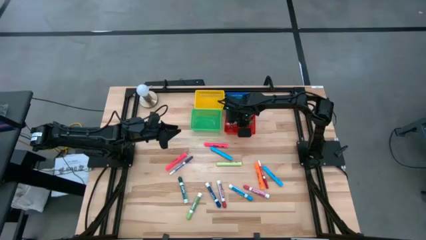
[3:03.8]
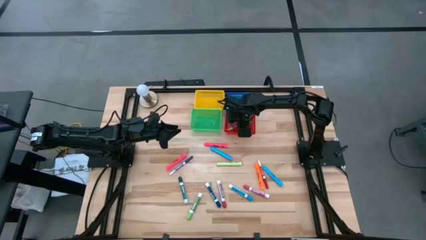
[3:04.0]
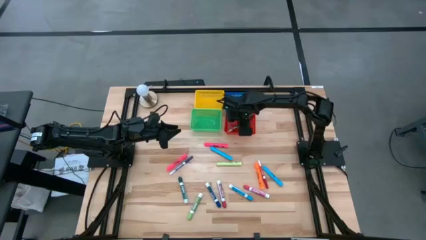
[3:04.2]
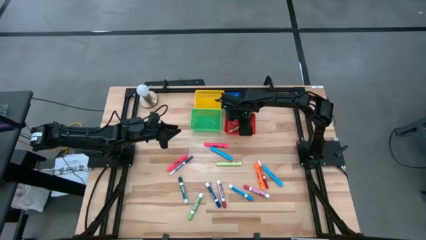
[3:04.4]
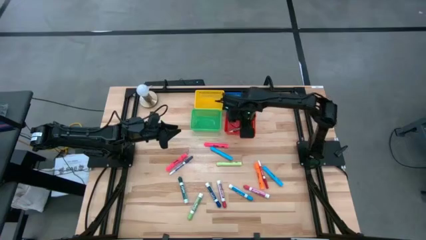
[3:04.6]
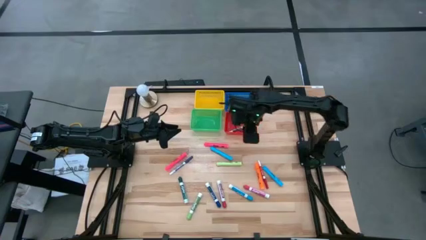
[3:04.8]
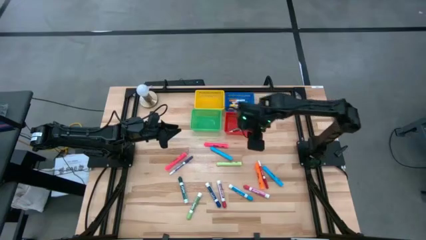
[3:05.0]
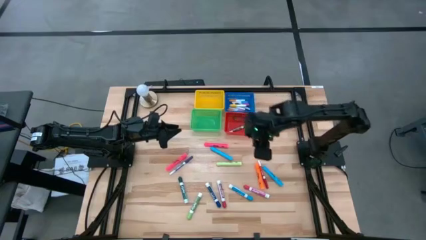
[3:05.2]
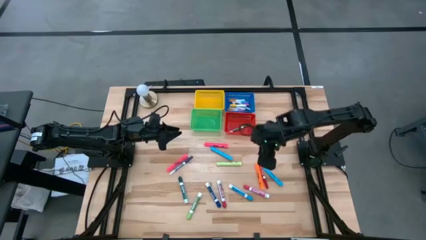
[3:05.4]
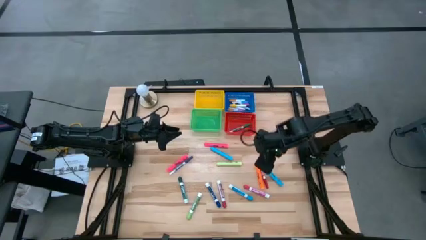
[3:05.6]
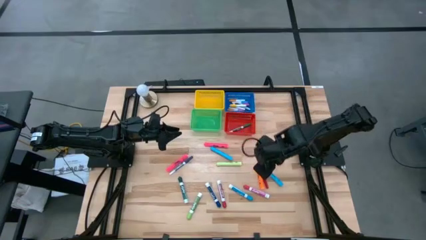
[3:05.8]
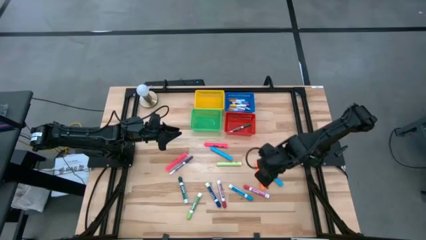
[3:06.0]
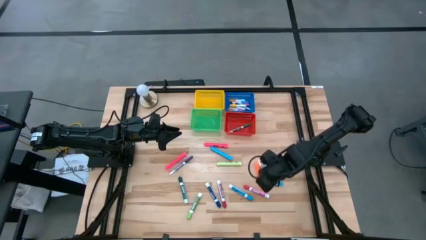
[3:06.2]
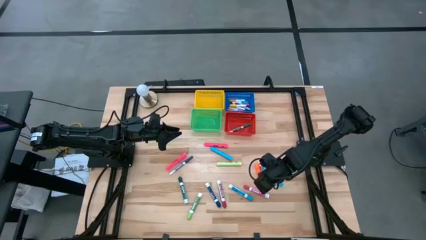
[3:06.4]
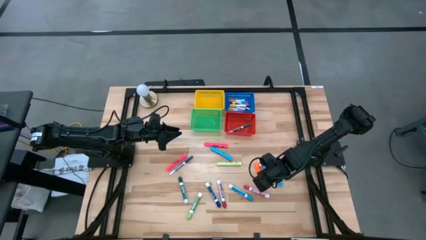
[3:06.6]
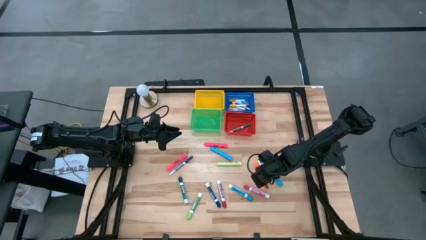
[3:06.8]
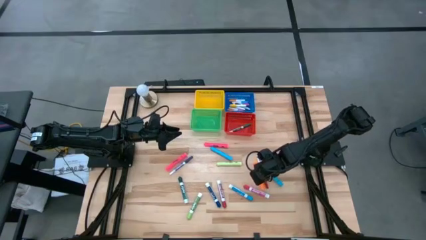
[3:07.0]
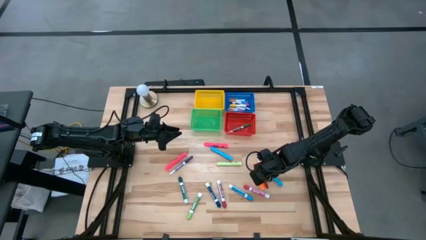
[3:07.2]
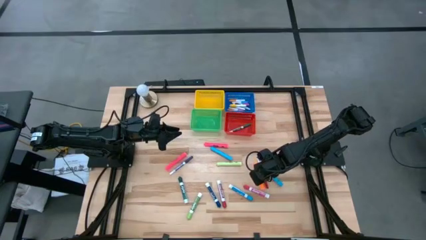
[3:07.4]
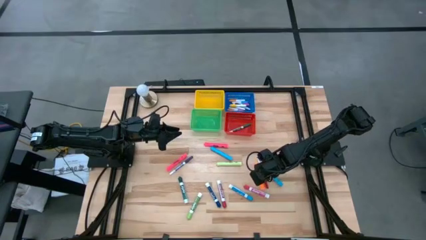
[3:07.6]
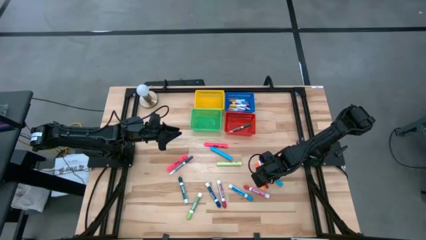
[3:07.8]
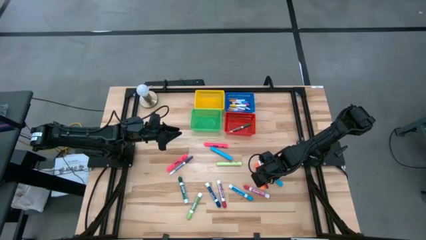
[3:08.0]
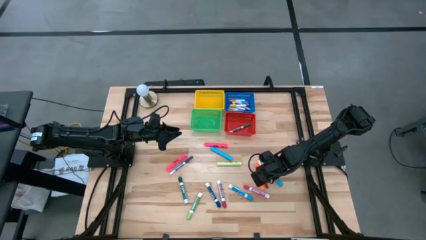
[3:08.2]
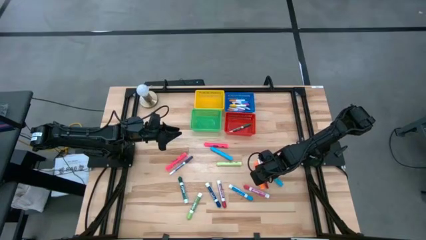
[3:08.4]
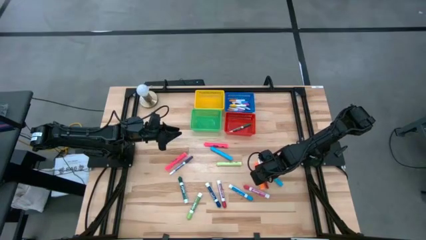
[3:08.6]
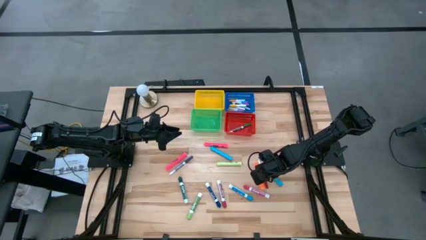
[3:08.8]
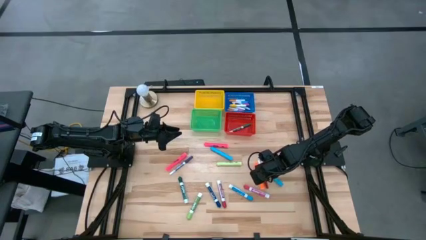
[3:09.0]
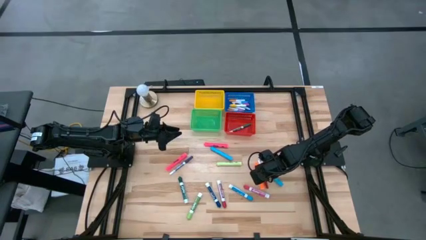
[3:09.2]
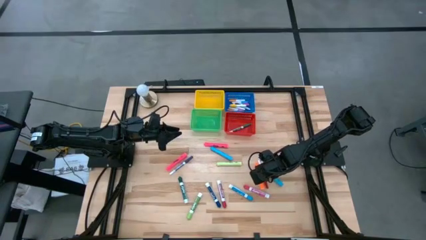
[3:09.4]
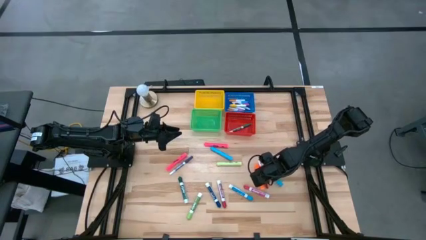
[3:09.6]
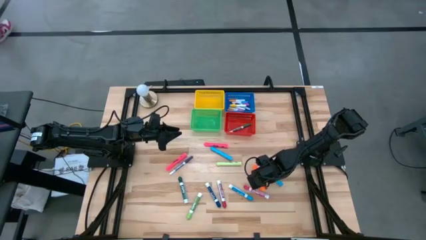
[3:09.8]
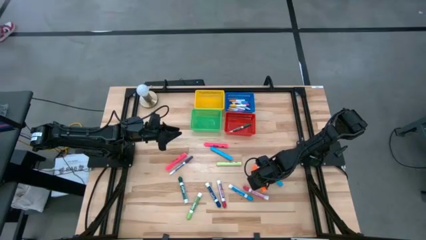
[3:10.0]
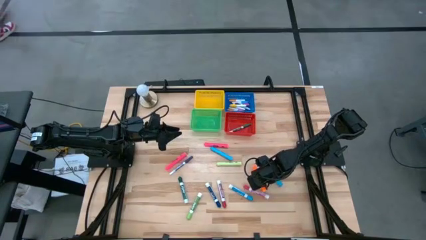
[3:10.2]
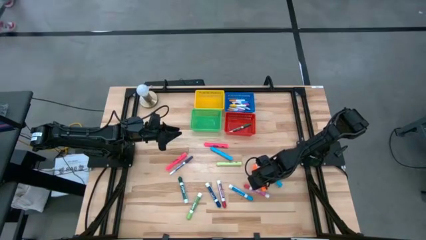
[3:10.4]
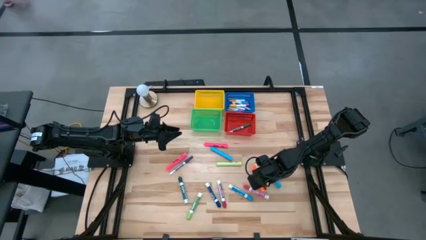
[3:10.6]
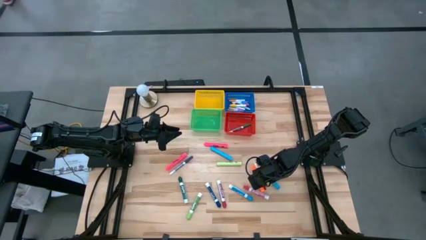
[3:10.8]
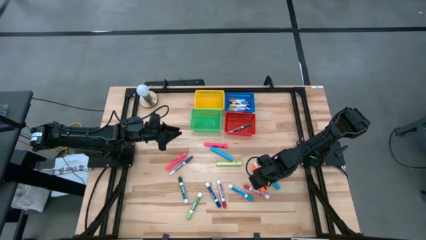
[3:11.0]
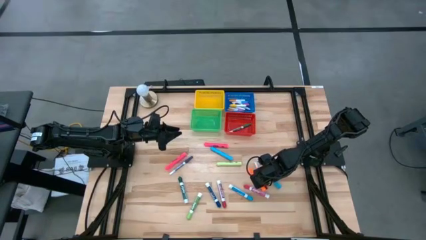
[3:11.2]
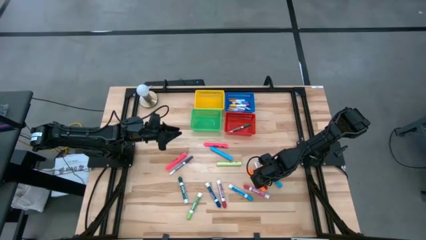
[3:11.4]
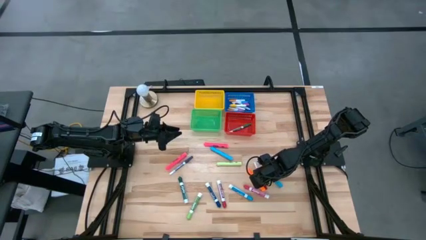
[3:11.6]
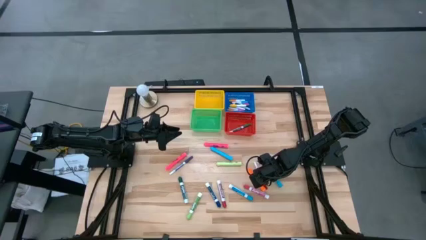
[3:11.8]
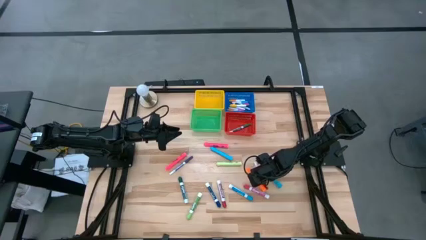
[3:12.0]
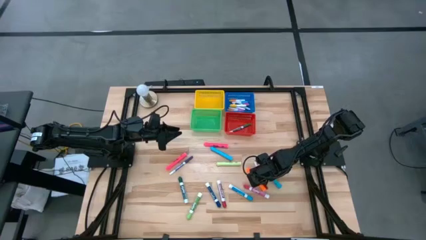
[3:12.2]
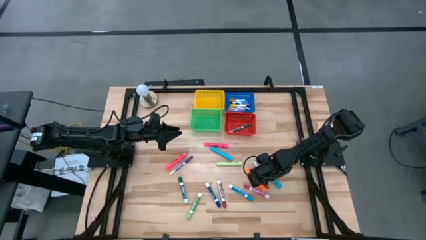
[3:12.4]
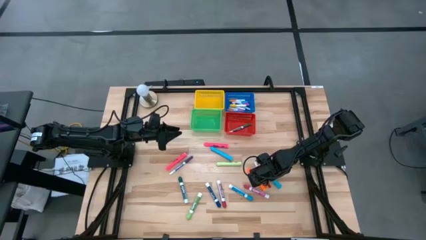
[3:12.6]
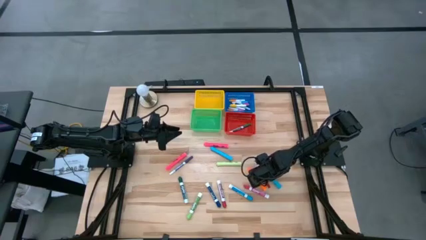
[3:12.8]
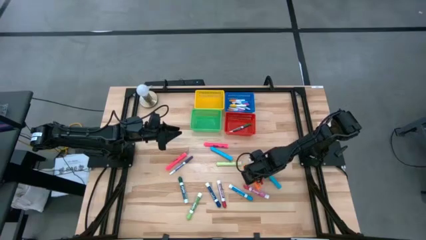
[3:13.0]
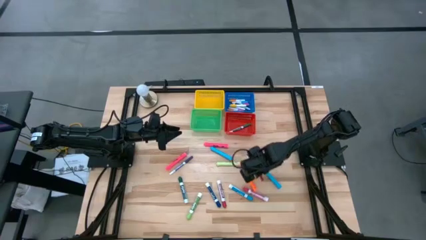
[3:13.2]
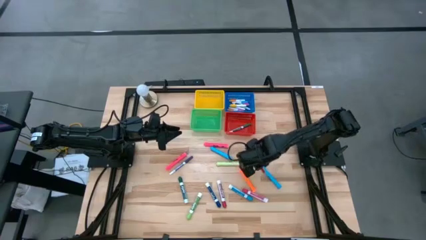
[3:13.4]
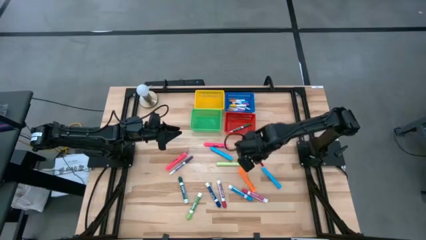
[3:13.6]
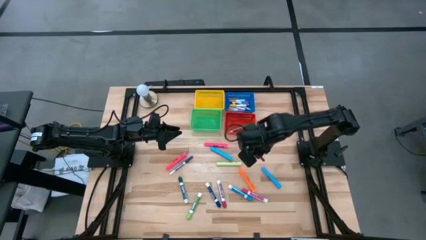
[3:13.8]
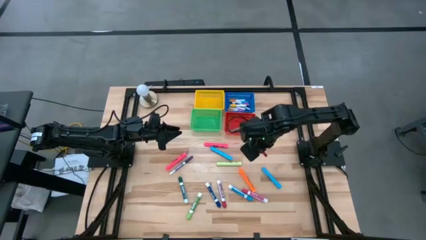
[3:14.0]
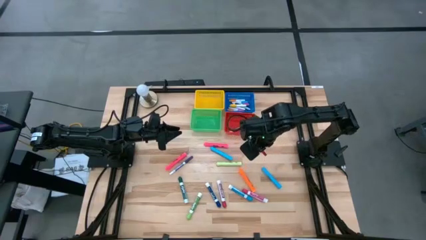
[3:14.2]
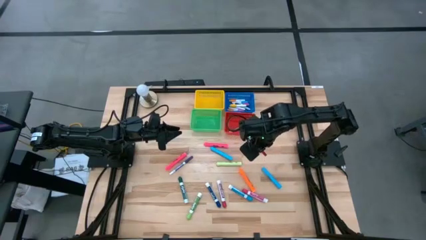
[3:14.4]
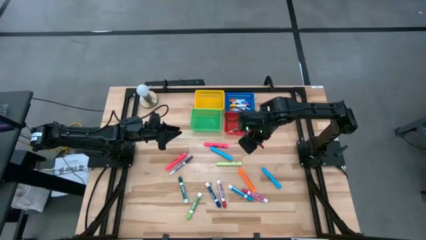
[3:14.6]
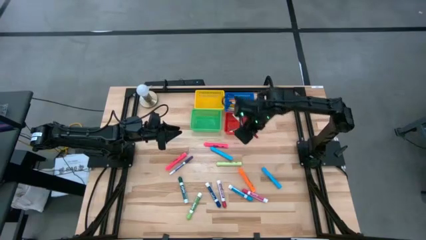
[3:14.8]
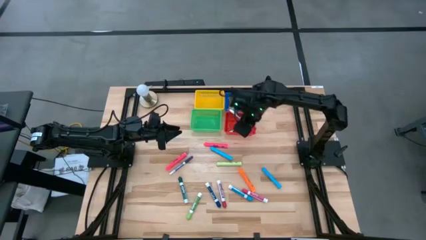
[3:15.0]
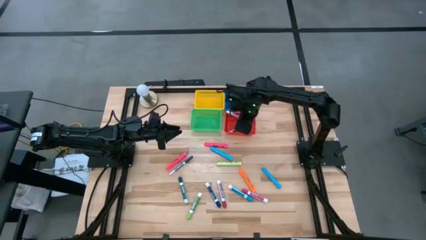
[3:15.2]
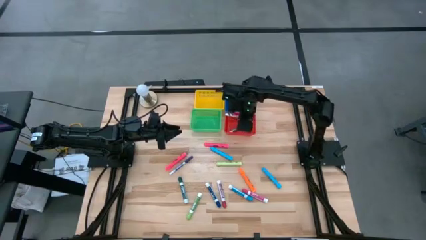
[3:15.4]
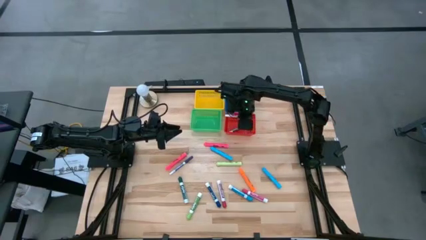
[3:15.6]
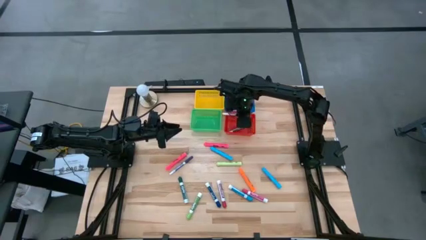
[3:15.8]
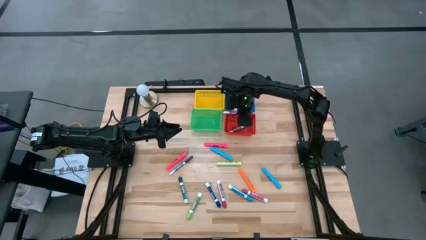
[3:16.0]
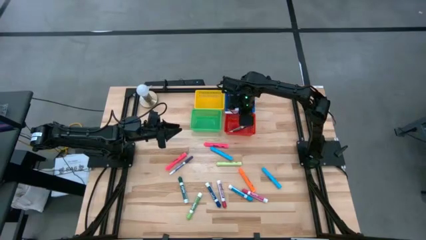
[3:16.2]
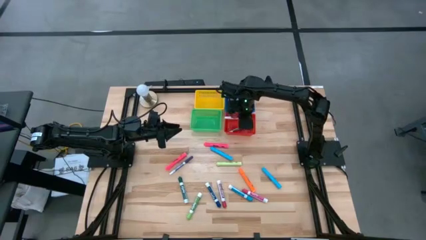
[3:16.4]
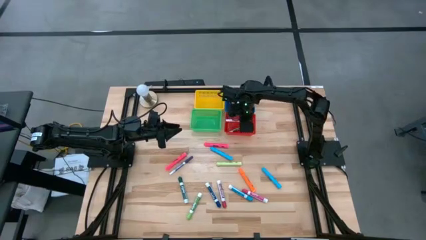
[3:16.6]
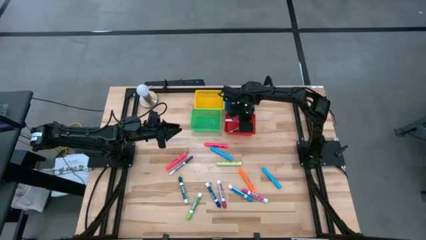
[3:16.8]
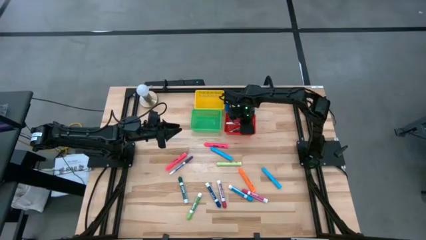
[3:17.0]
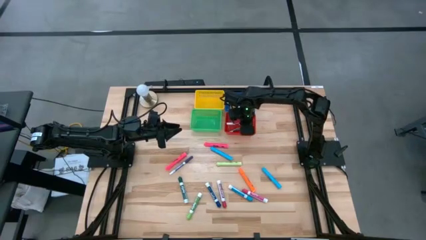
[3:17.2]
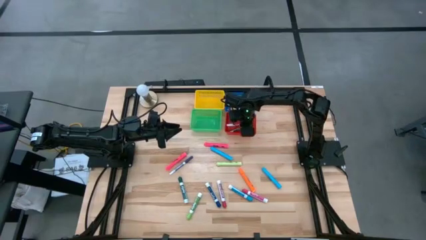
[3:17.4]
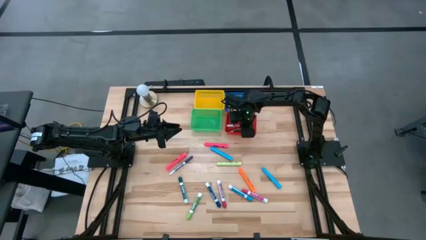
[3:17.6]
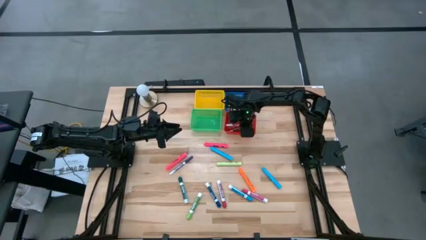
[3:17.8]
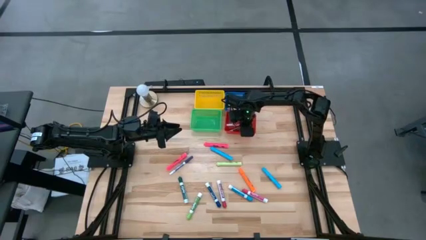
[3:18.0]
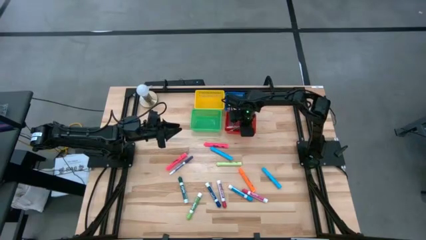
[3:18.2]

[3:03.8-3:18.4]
Task: Pick & Place Markers
Put the small red marker pen into the red bin
